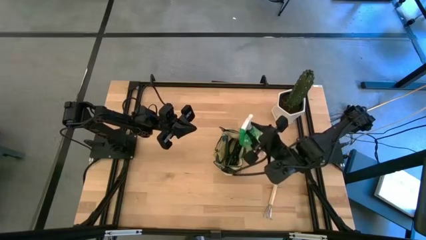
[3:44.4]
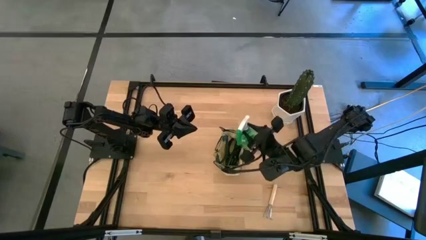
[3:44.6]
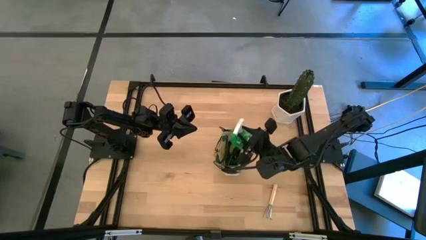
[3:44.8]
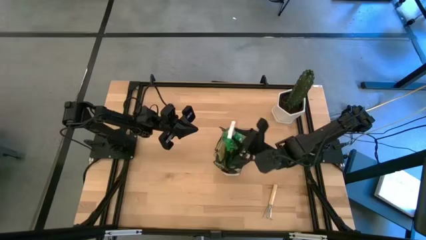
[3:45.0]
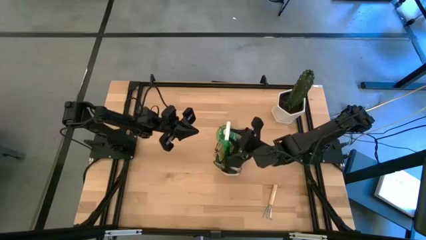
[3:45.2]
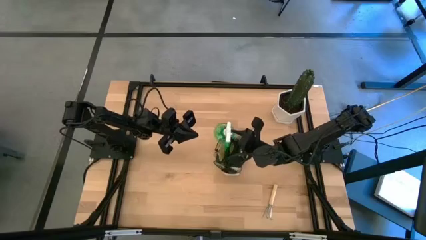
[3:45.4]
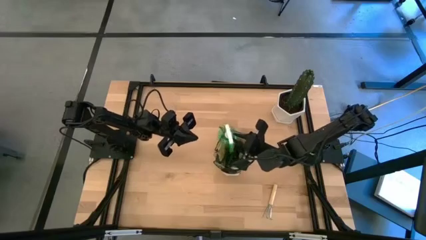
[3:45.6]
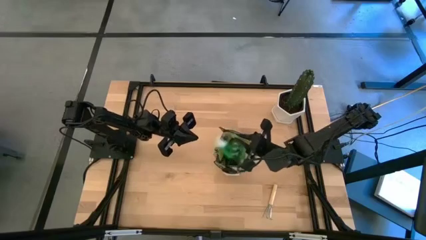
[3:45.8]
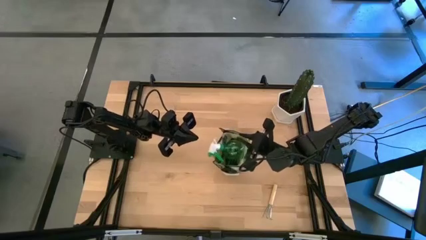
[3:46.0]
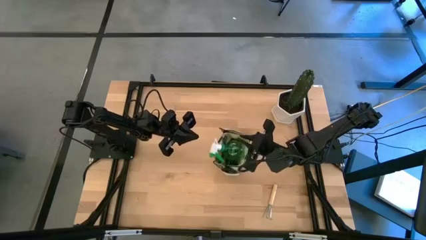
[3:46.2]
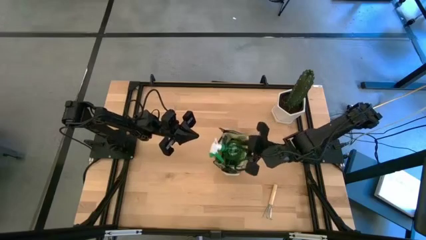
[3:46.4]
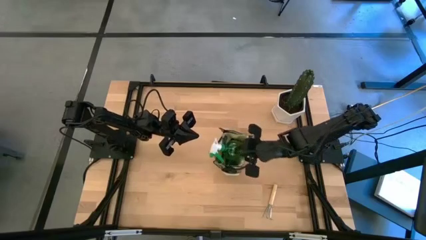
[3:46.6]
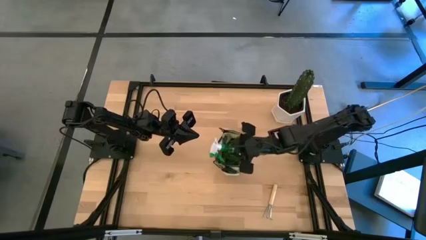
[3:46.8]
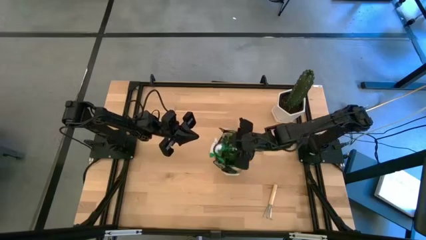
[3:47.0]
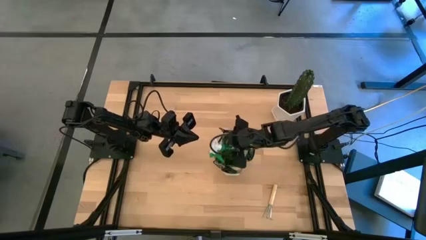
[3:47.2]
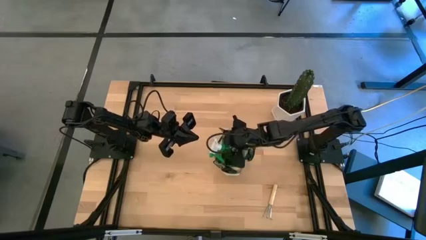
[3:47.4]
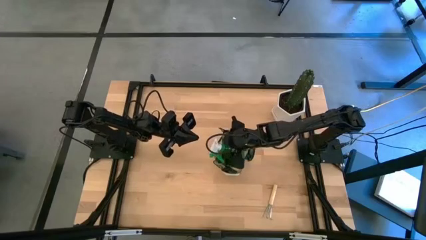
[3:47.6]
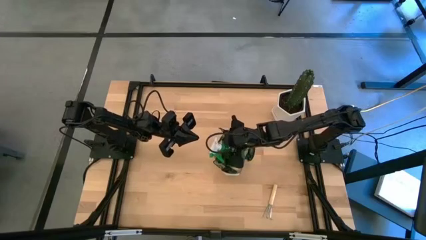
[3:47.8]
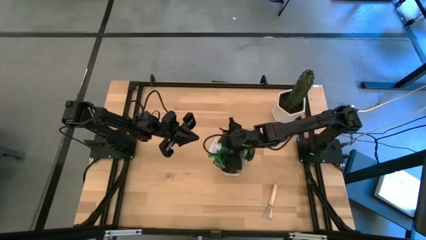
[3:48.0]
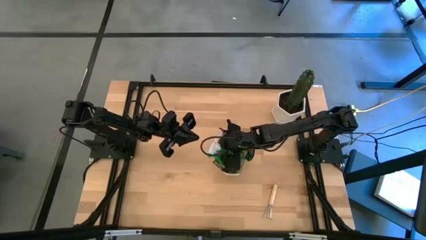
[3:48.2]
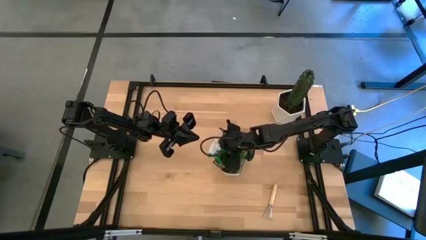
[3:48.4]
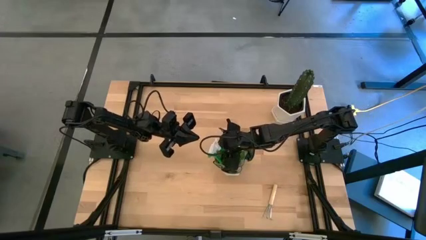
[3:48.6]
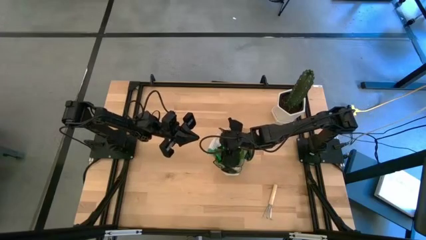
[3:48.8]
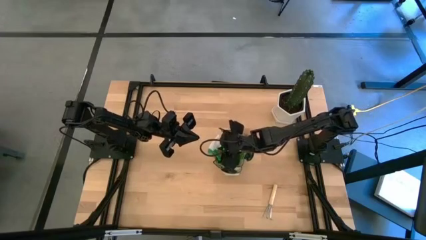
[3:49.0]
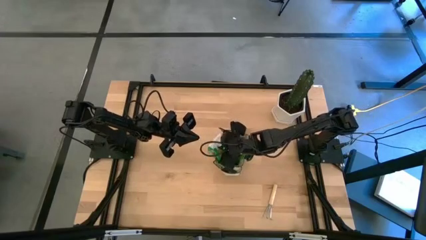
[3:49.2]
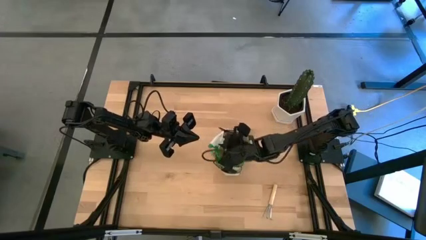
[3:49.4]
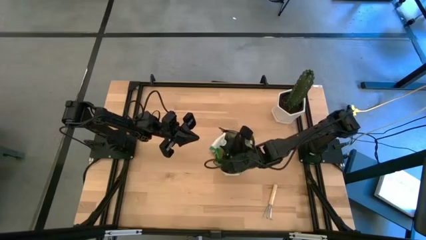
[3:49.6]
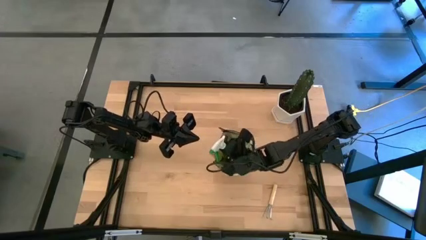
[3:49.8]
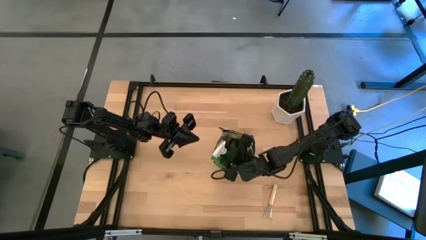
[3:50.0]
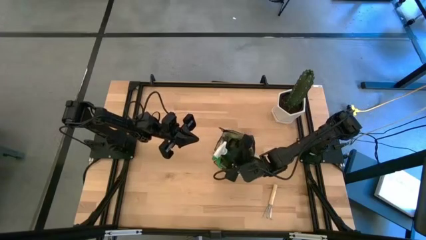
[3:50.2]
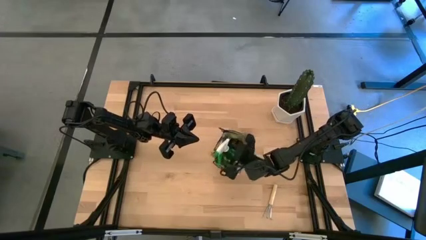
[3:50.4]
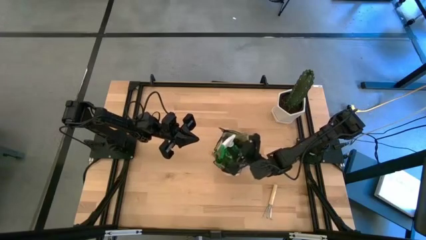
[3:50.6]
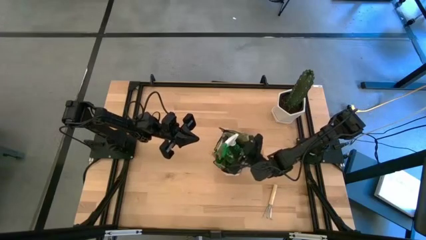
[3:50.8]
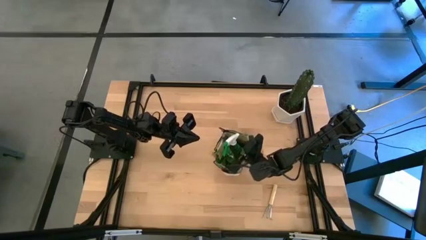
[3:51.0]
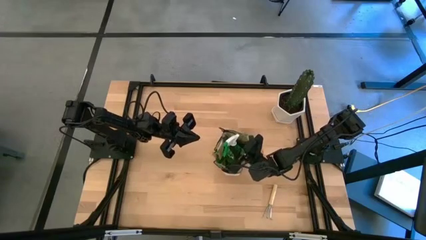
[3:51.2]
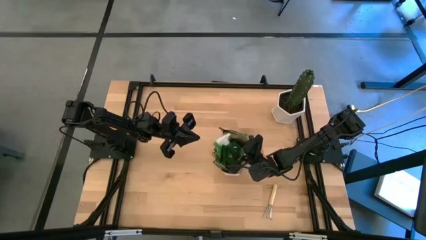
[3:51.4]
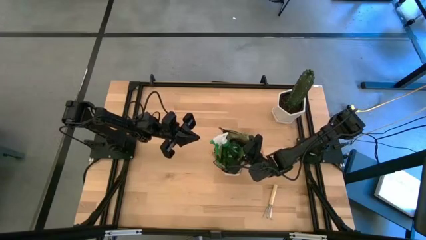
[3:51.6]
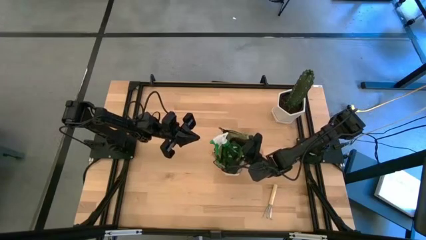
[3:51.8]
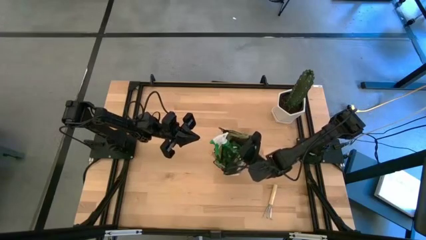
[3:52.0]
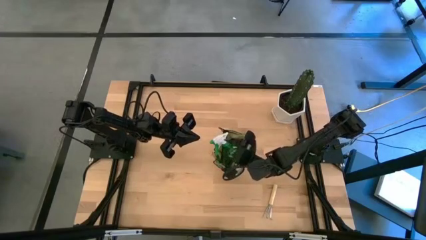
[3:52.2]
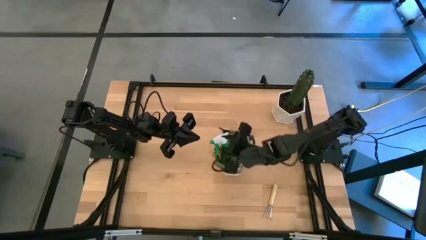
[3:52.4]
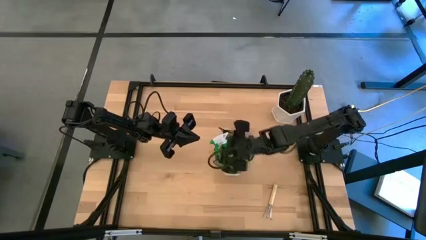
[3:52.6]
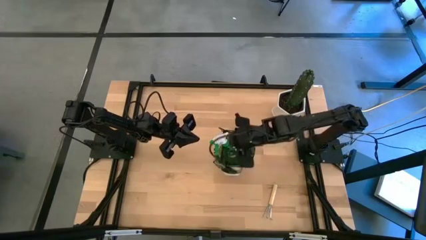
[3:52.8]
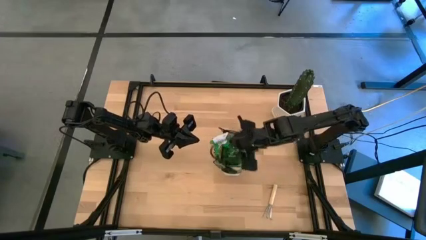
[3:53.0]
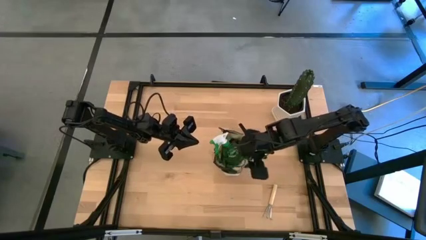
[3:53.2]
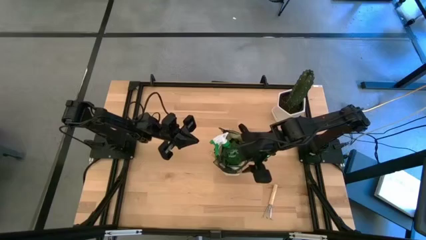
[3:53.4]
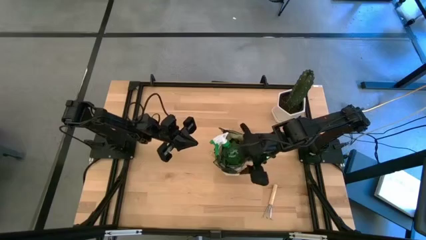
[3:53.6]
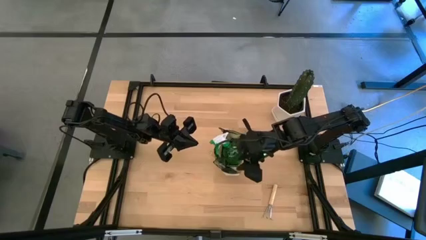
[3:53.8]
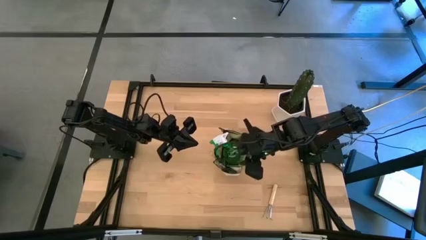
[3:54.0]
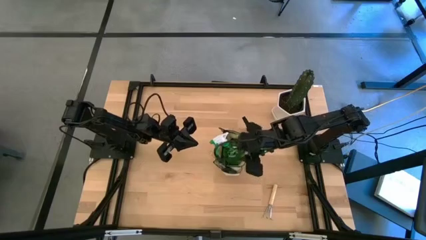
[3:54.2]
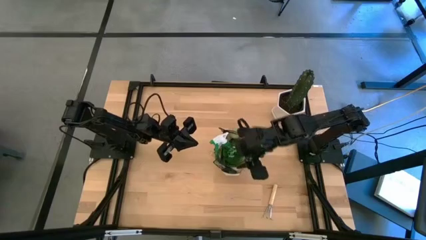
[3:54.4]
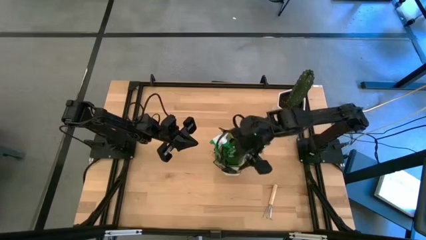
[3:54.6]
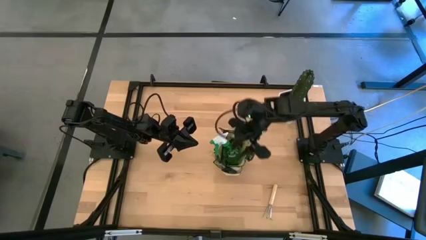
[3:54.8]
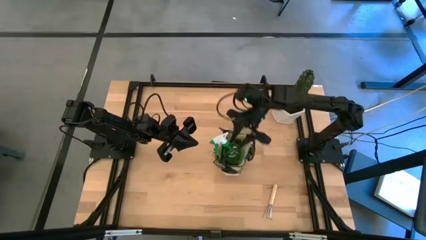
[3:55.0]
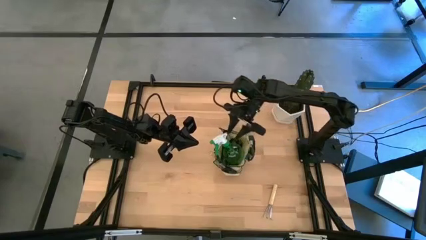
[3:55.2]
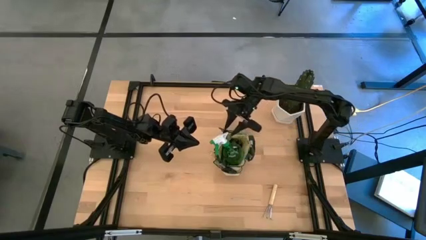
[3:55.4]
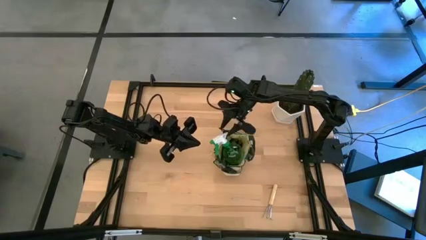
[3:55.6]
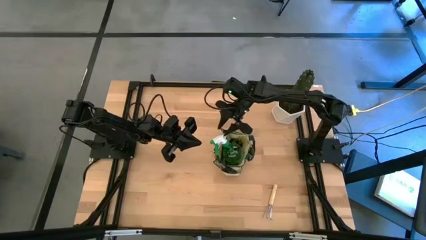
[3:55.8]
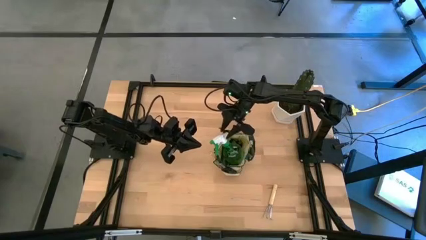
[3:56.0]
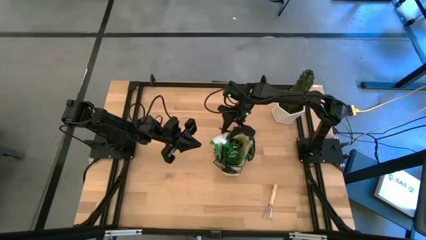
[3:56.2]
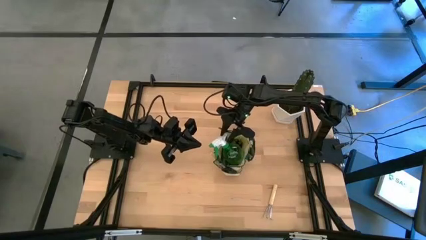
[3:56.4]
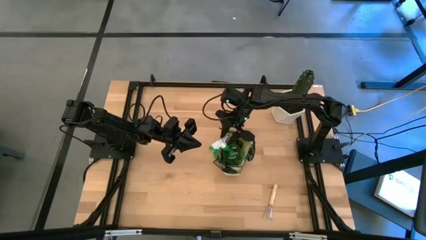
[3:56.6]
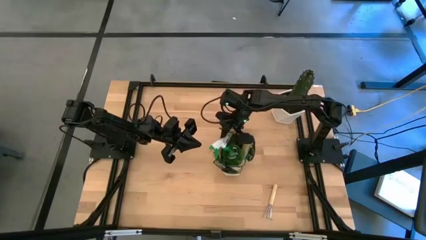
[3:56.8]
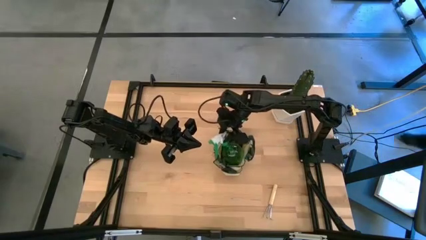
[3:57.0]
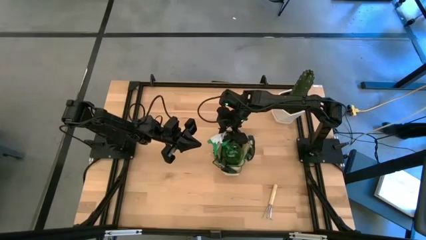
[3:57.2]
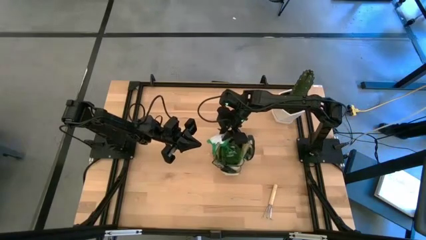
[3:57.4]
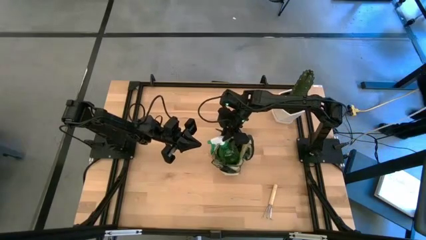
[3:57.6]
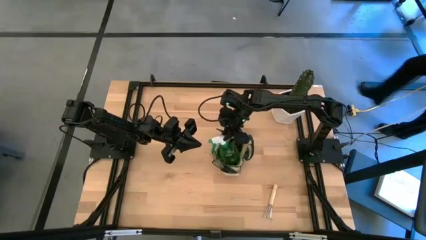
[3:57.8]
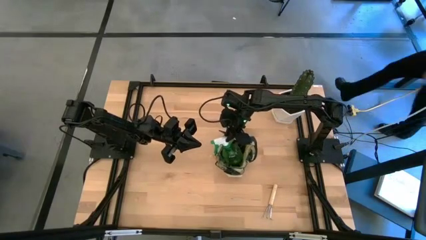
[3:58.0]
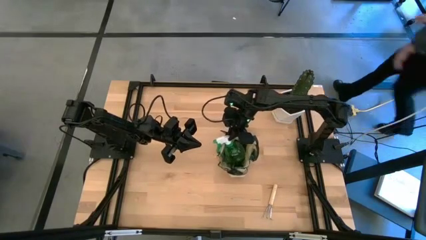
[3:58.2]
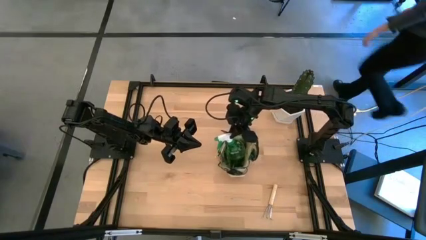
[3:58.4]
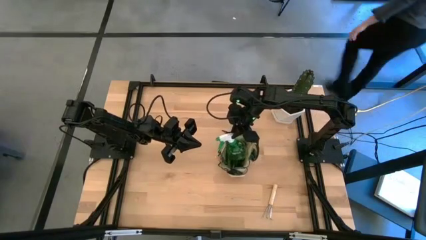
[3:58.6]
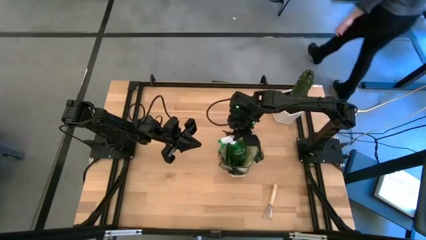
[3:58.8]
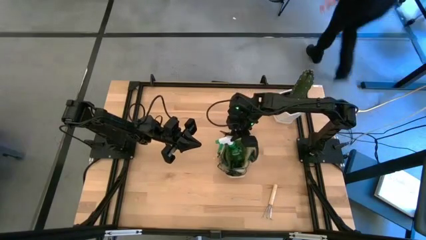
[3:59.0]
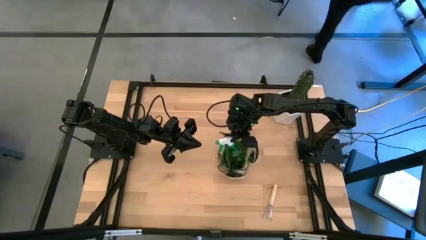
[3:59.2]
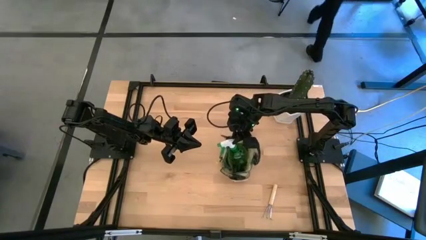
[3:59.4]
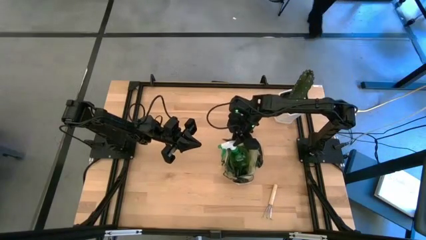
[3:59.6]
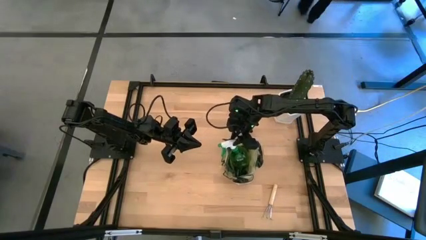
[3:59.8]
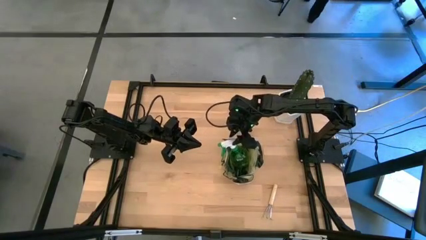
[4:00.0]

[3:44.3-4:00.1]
Task: Pick & Place Garden tools in Gardening bag
Put the green spray bottle into the green gardening bag

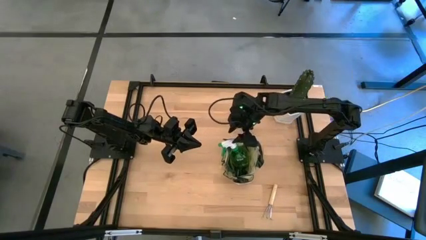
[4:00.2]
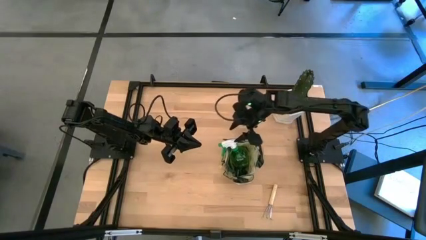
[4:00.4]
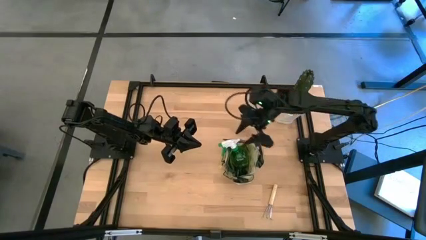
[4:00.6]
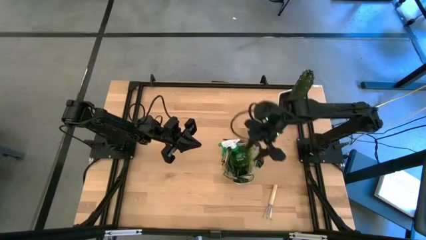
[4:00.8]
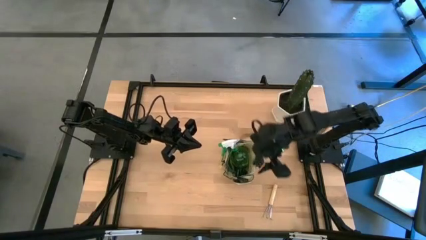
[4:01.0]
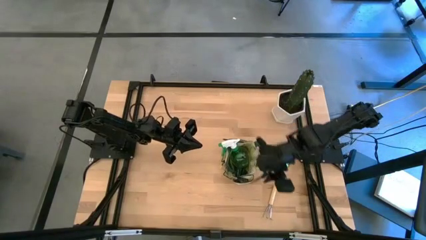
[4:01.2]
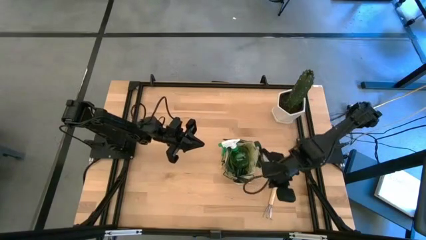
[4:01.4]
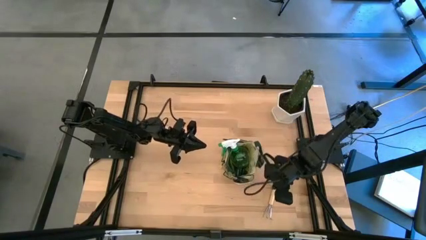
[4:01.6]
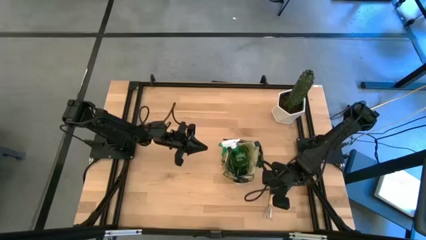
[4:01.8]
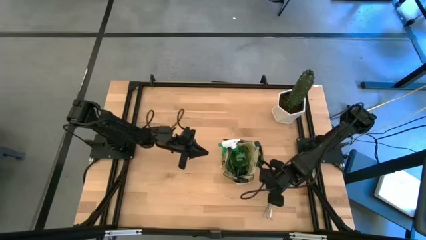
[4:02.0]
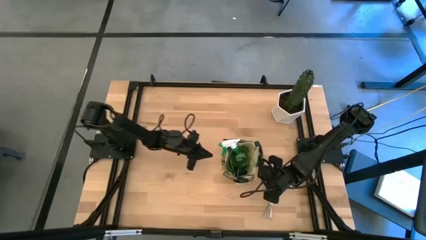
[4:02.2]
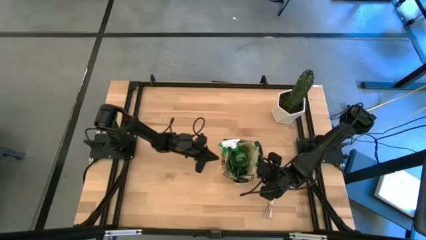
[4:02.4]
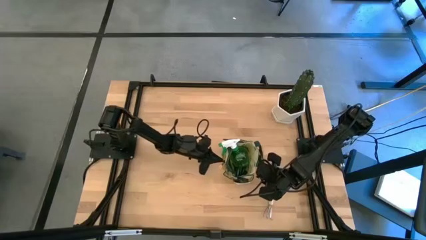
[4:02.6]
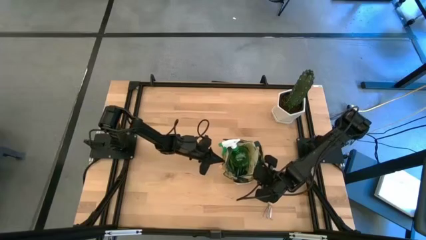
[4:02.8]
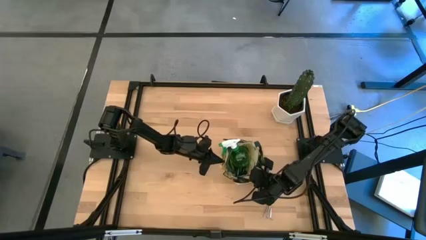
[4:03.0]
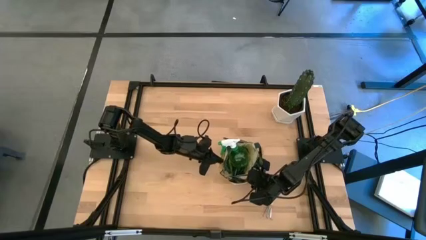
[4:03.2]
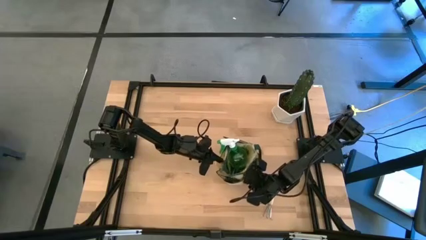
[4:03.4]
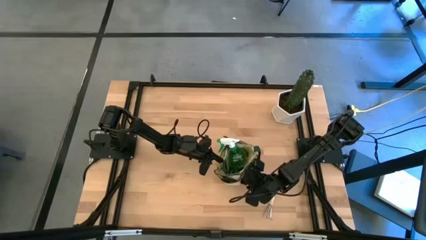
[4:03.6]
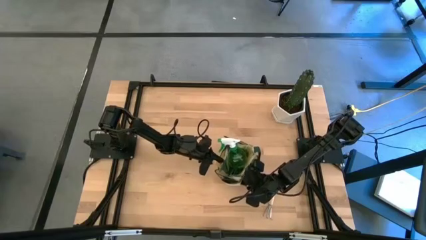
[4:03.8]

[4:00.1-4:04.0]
Adjust the green gardening bag
